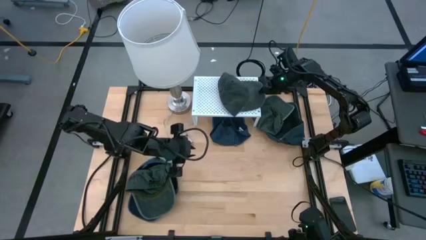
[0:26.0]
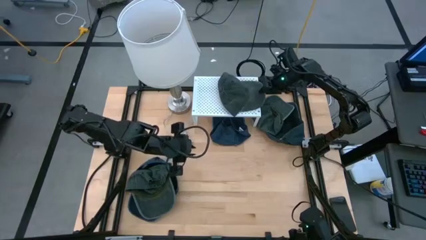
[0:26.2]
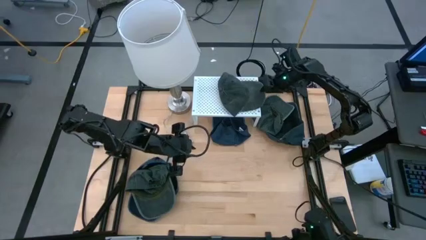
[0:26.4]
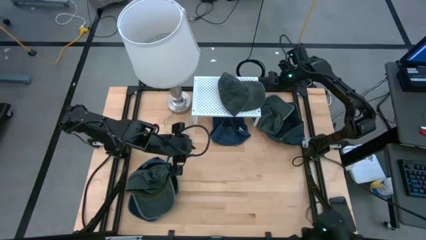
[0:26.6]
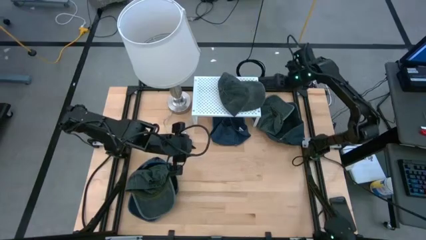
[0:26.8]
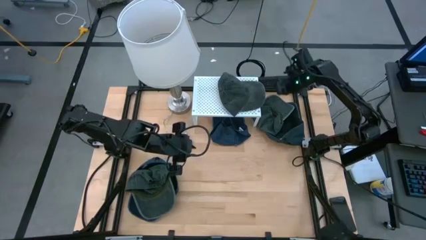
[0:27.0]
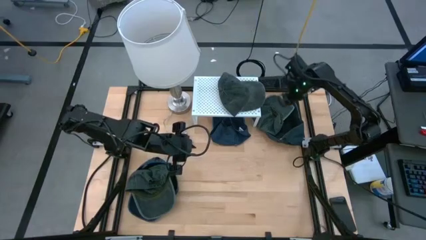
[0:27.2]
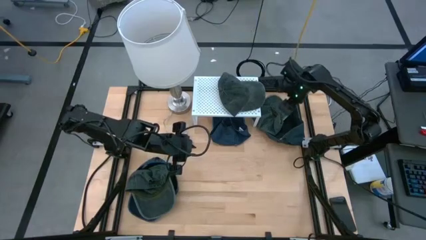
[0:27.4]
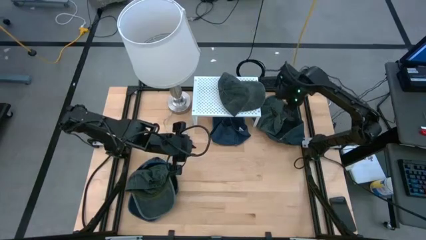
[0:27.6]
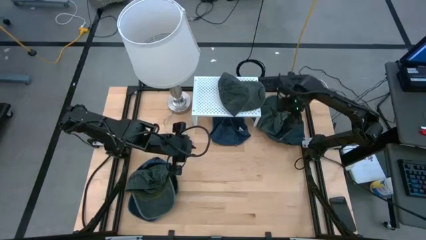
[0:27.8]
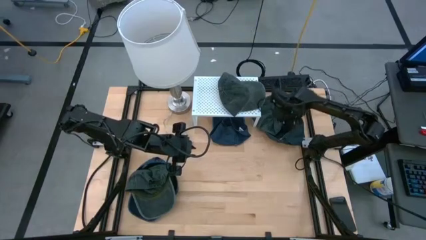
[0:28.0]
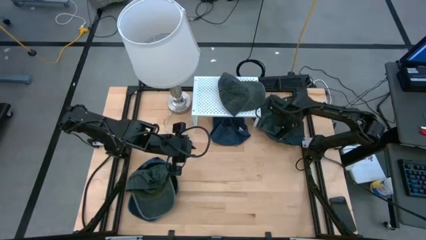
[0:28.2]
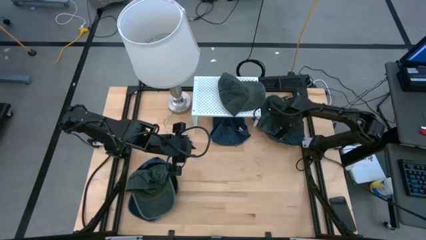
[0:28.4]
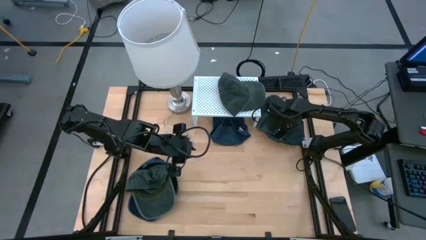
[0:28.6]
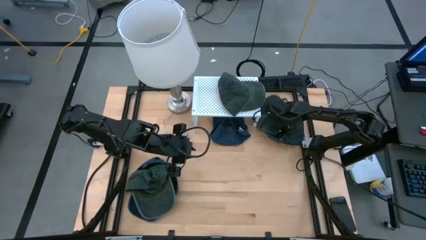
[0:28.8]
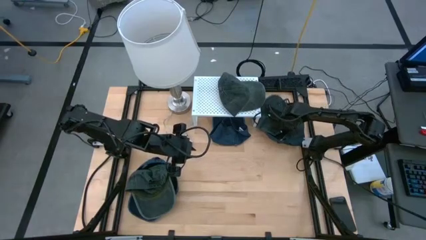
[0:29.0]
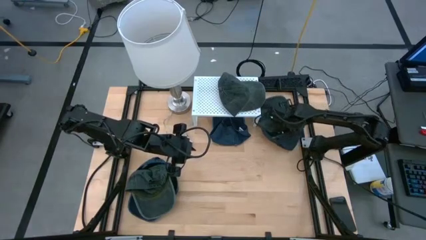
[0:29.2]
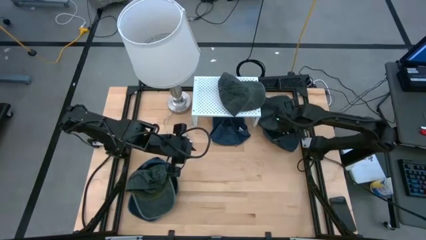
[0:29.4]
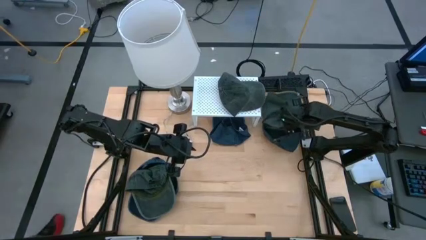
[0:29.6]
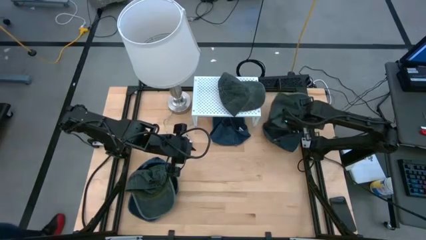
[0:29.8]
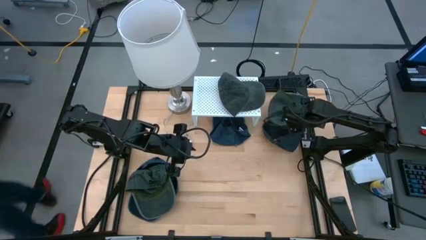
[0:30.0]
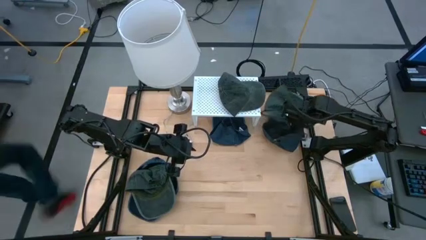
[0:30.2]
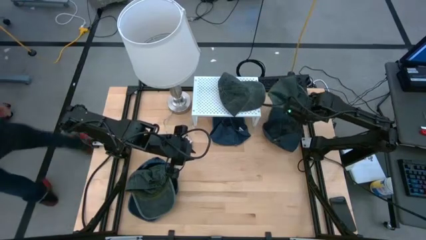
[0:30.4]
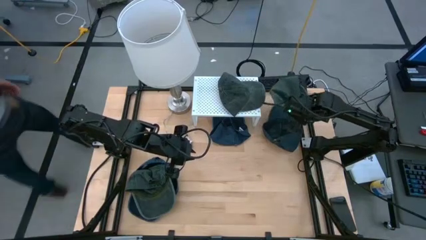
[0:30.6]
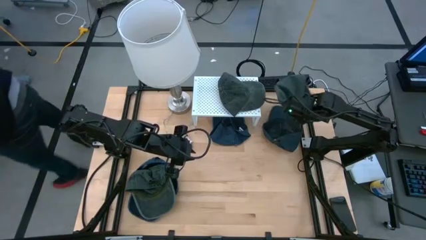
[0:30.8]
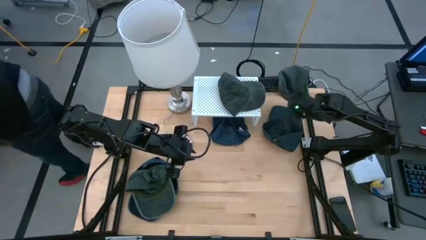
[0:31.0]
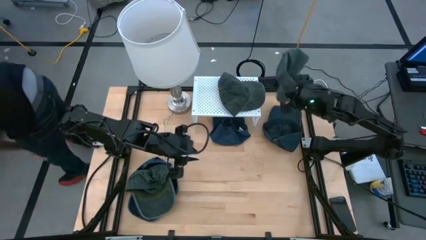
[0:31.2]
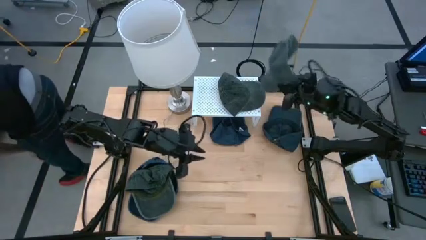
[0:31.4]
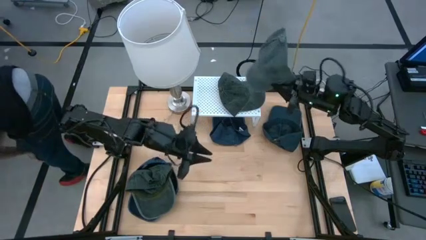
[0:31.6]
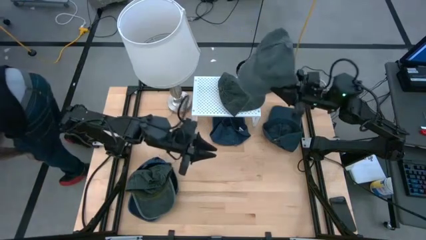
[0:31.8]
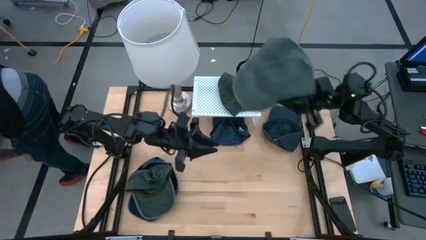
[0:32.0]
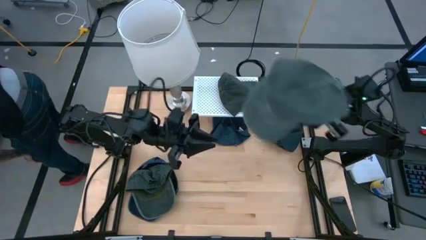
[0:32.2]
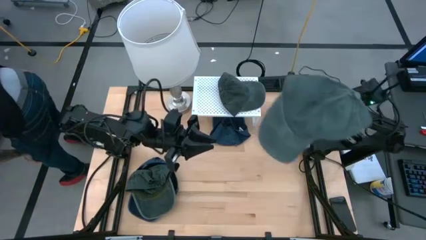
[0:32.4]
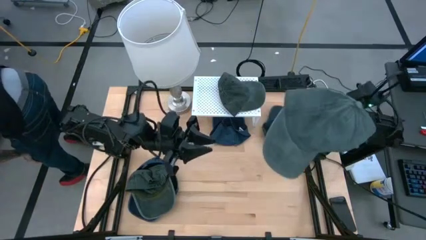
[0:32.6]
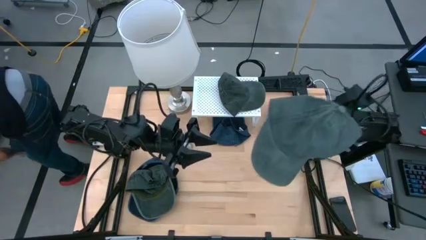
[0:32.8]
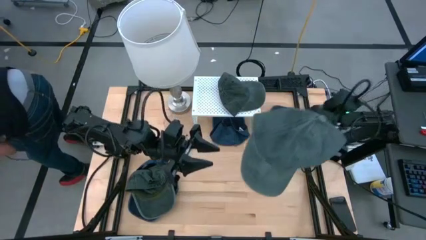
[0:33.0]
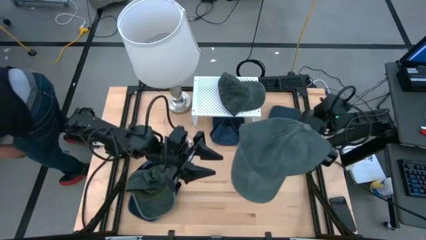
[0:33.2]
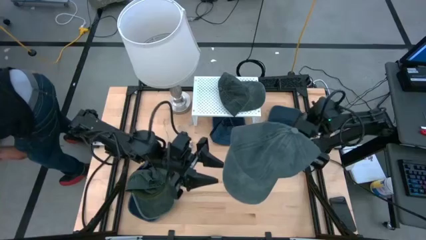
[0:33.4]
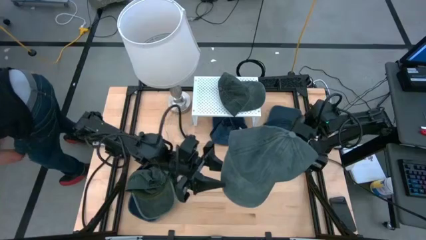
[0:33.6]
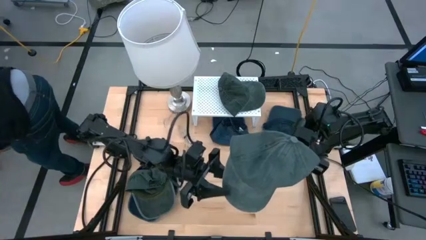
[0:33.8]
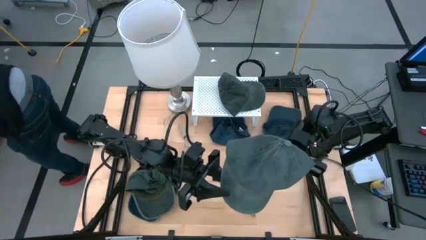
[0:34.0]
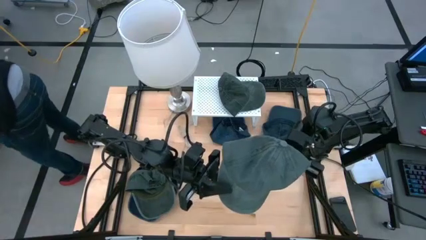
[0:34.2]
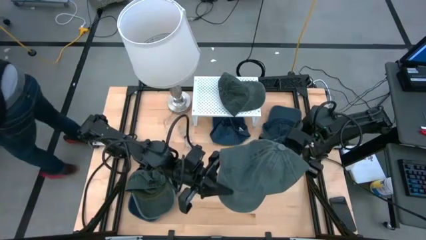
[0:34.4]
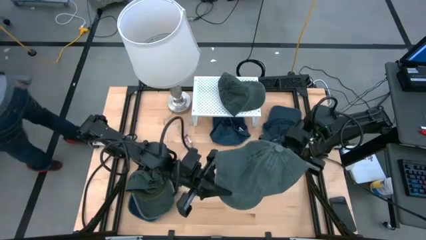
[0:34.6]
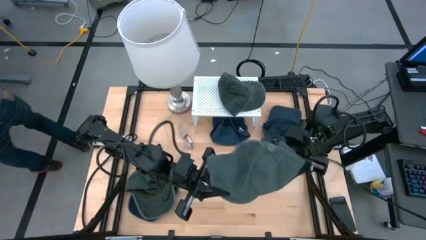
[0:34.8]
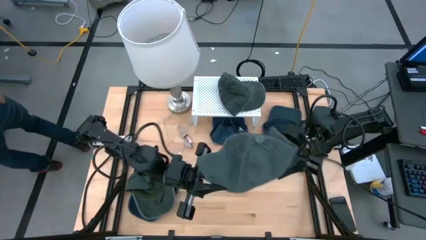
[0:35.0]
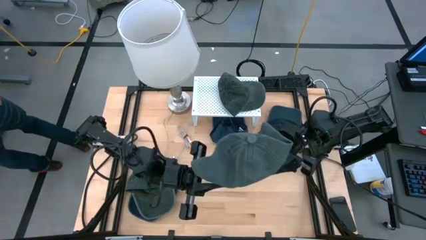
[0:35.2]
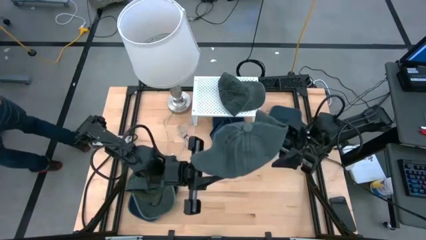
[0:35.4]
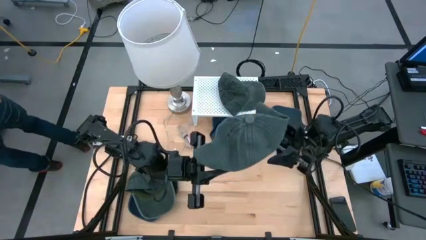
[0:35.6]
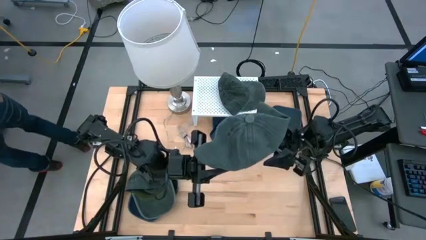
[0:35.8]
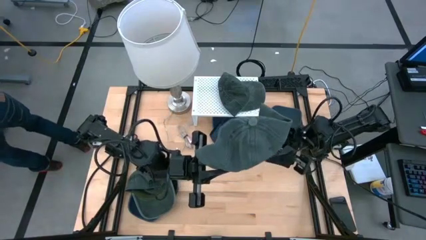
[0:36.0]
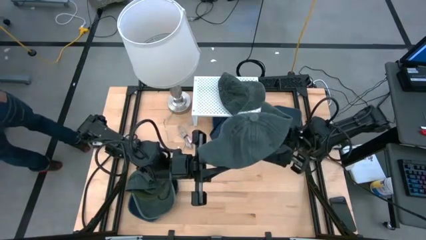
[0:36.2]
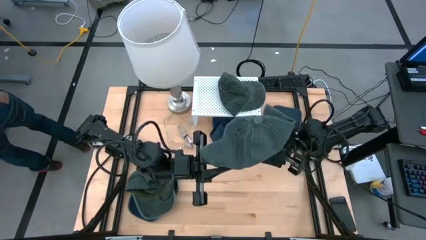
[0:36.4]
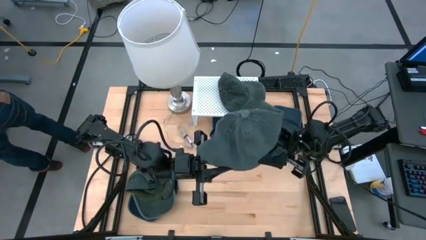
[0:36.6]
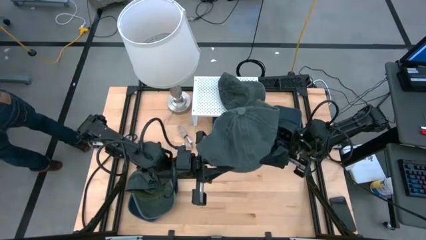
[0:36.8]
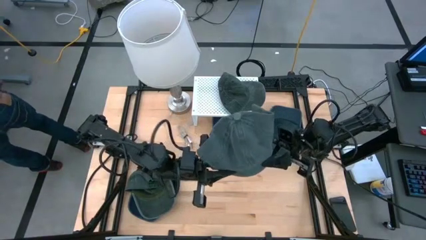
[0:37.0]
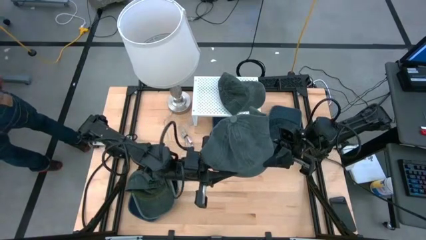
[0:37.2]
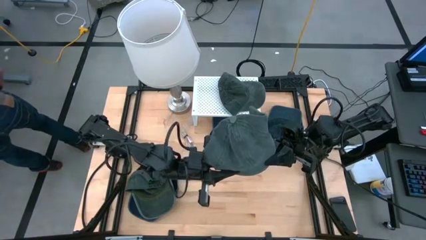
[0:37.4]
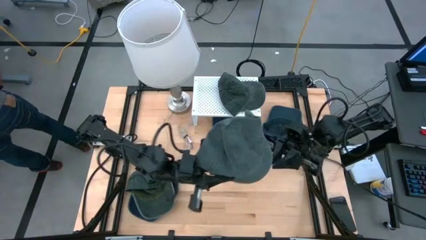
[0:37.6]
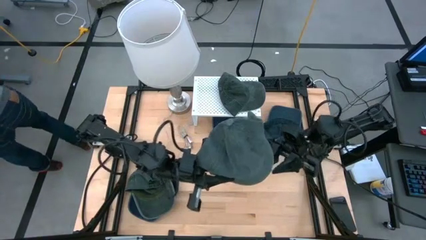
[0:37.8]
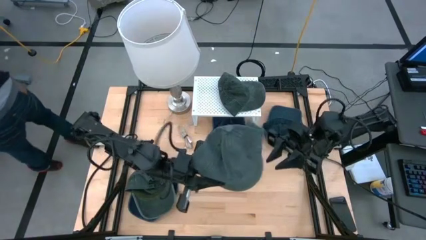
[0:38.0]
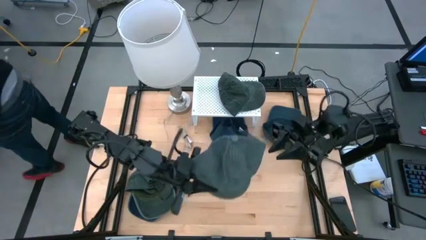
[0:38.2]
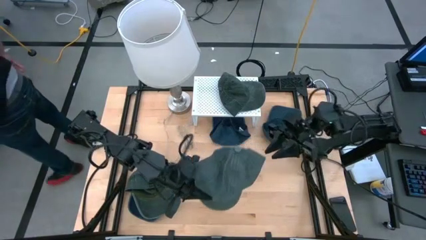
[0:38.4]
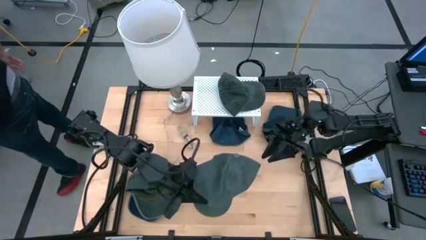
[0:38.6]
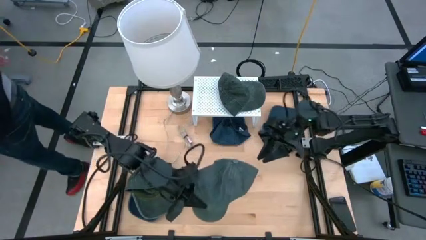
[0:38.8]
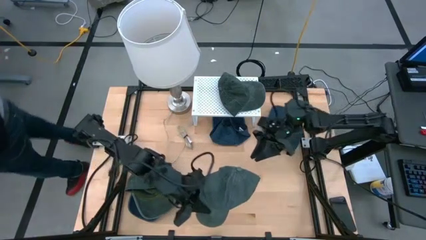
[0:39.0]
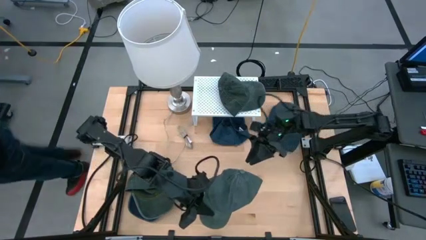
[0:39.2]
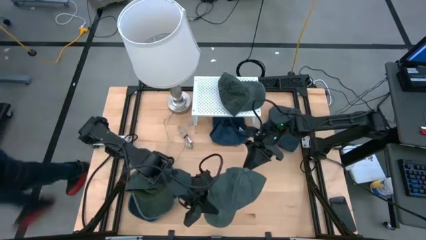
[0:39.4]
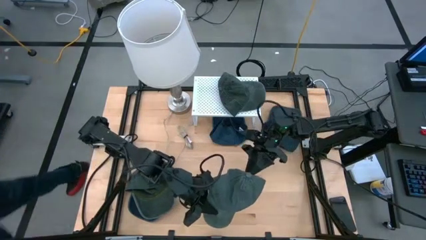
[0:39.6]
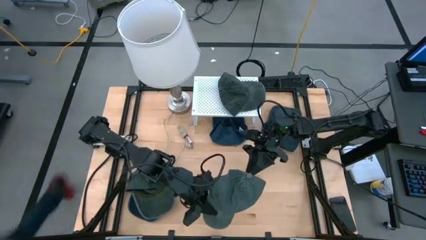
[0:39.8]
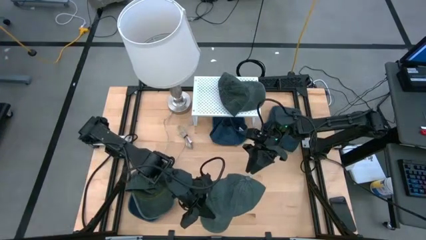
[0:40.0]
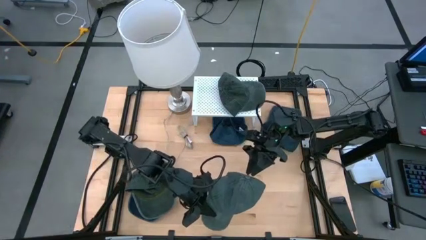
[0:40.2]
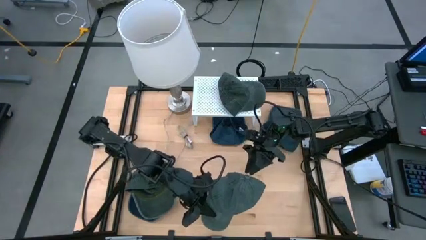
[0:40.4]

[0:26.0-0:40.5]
Task: Pick & Place hat
Stack the top gray cap on the gray cap on the shelf
